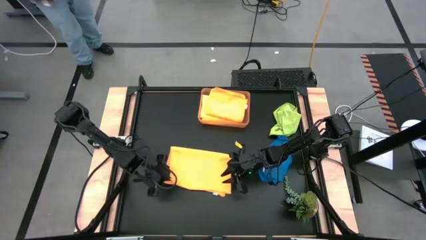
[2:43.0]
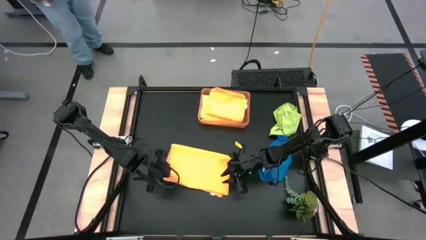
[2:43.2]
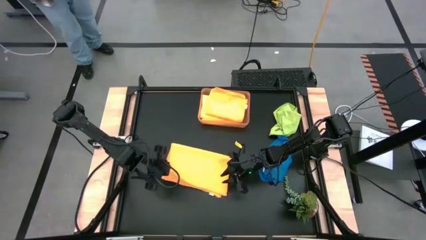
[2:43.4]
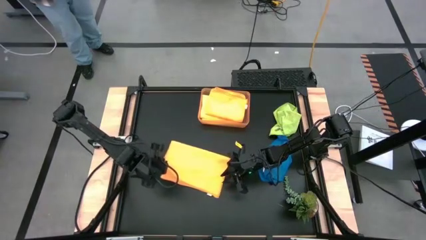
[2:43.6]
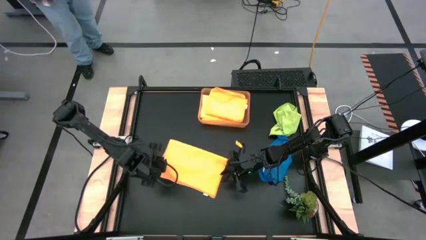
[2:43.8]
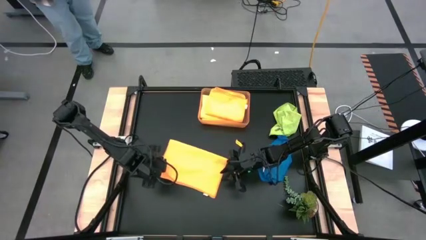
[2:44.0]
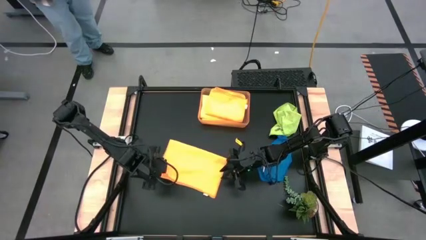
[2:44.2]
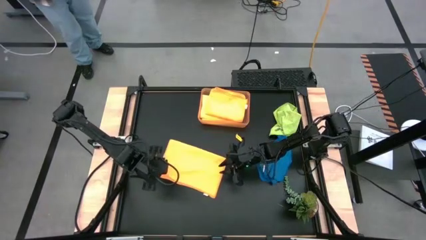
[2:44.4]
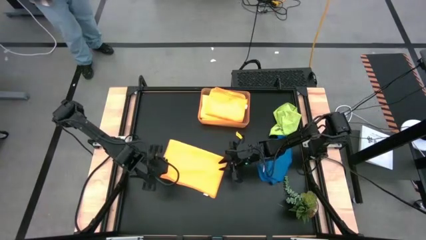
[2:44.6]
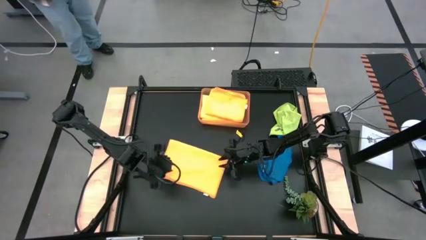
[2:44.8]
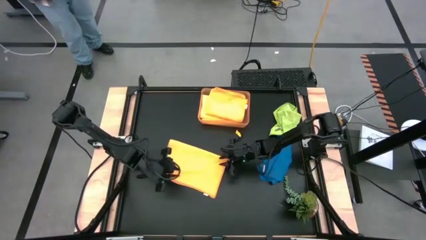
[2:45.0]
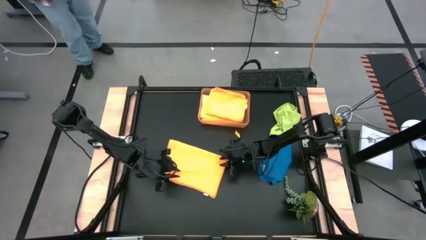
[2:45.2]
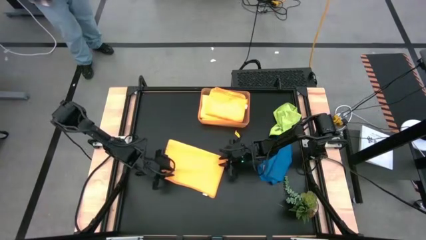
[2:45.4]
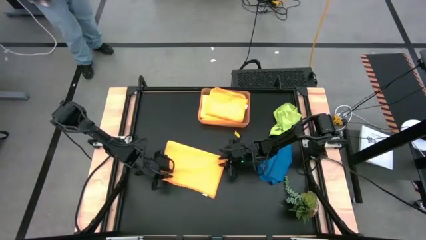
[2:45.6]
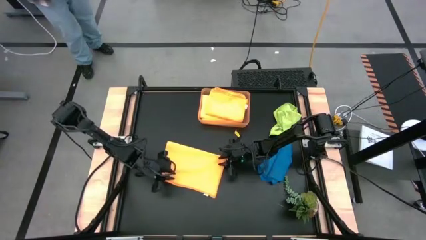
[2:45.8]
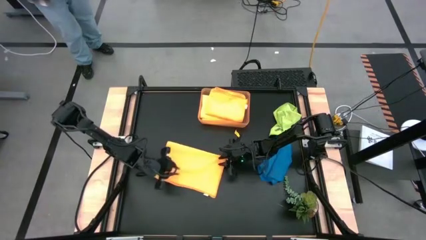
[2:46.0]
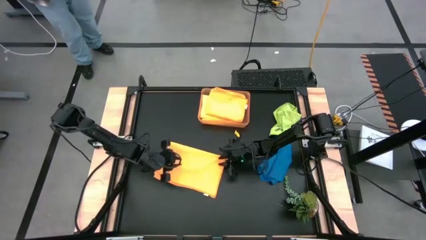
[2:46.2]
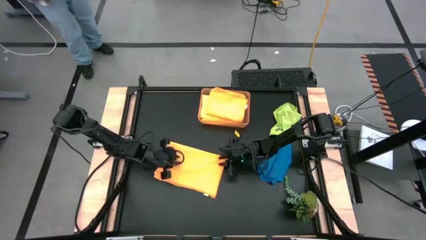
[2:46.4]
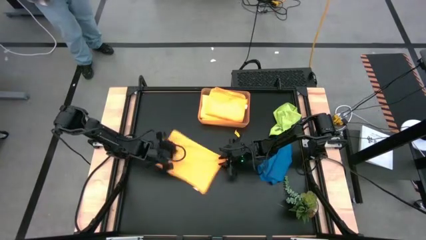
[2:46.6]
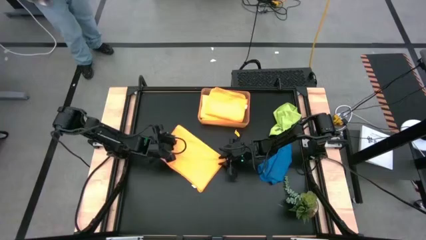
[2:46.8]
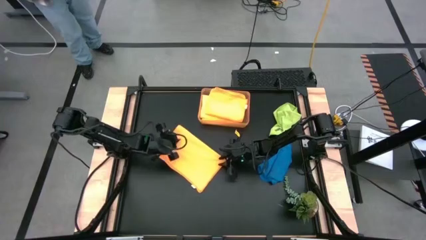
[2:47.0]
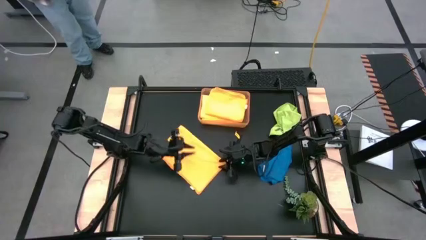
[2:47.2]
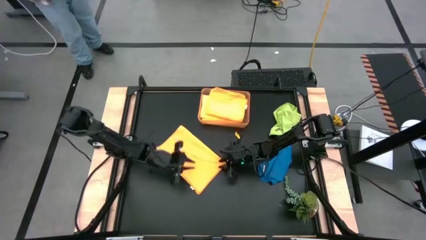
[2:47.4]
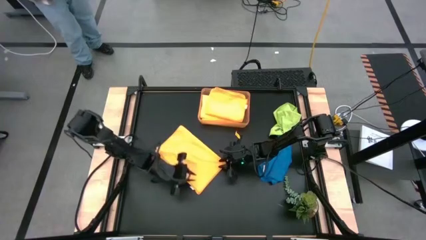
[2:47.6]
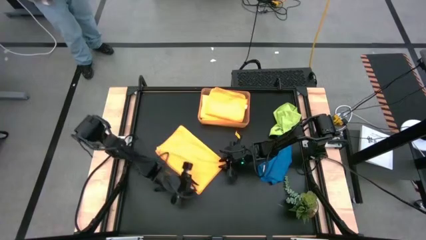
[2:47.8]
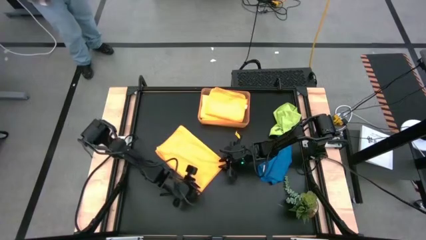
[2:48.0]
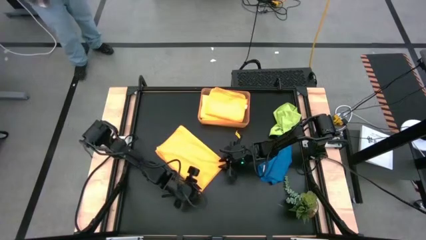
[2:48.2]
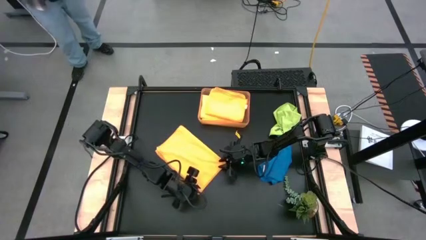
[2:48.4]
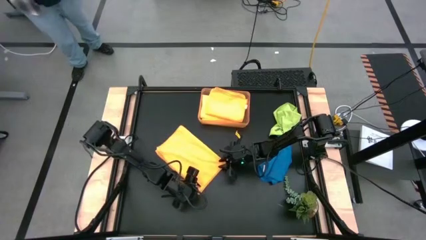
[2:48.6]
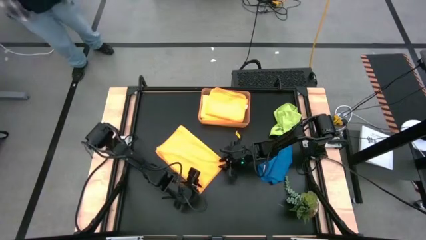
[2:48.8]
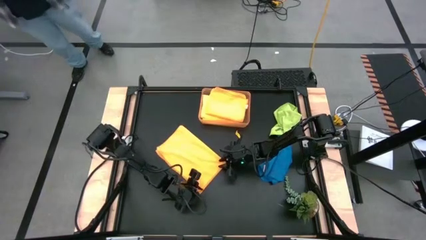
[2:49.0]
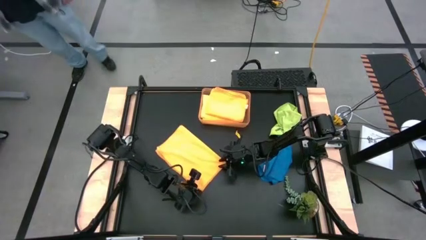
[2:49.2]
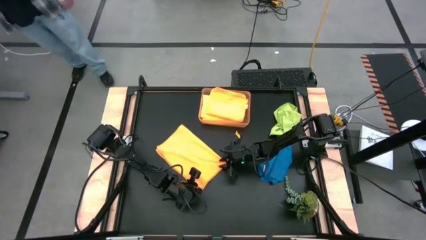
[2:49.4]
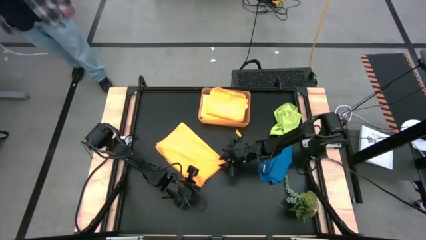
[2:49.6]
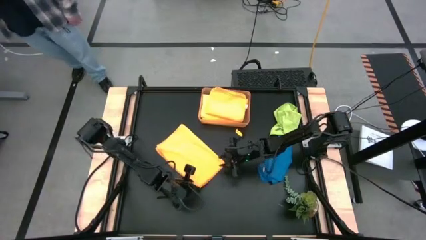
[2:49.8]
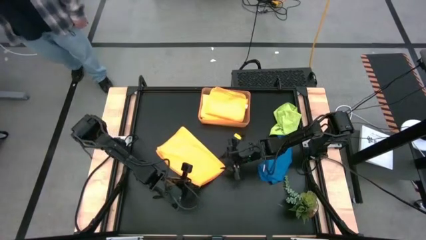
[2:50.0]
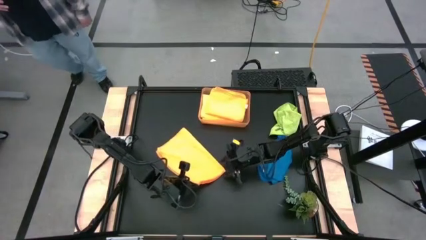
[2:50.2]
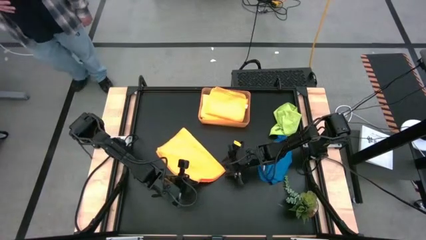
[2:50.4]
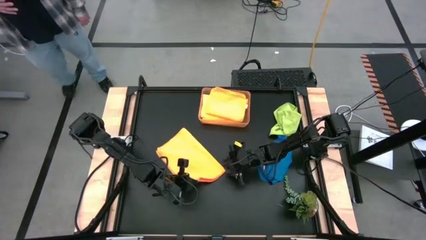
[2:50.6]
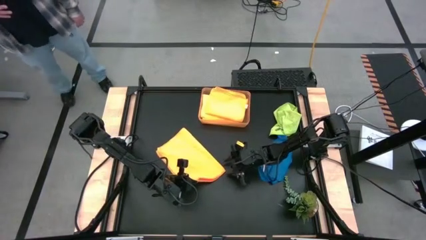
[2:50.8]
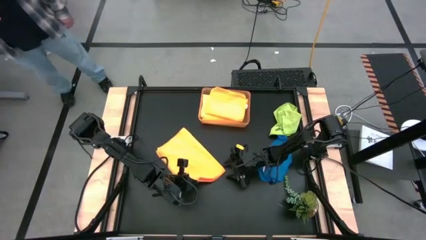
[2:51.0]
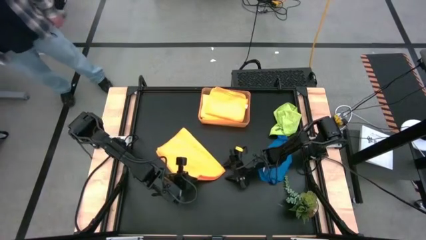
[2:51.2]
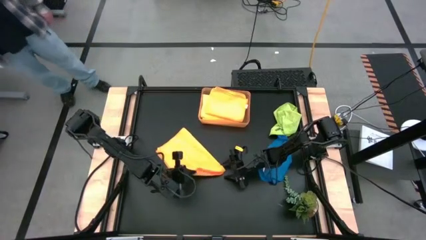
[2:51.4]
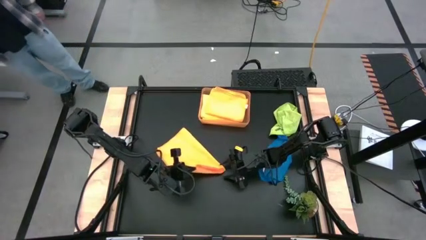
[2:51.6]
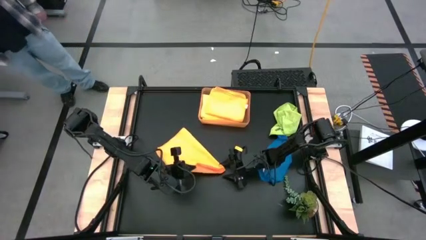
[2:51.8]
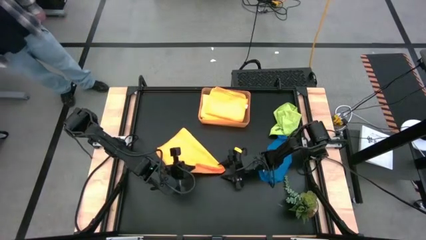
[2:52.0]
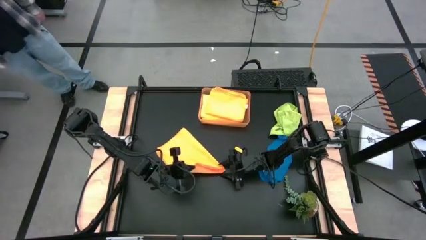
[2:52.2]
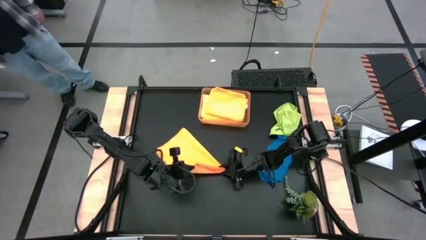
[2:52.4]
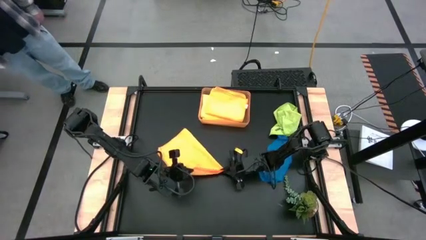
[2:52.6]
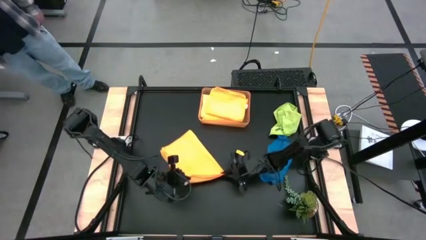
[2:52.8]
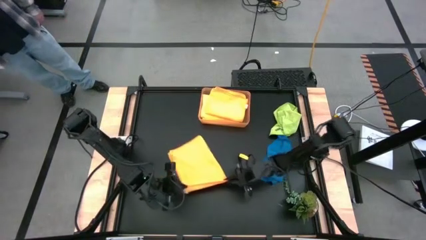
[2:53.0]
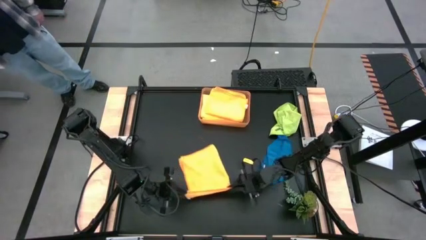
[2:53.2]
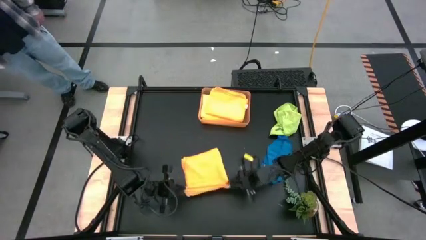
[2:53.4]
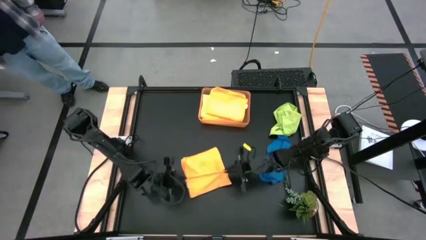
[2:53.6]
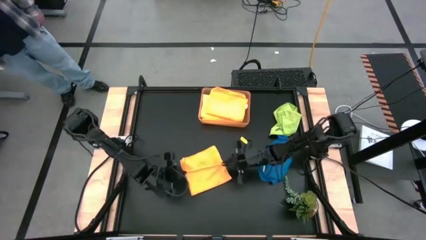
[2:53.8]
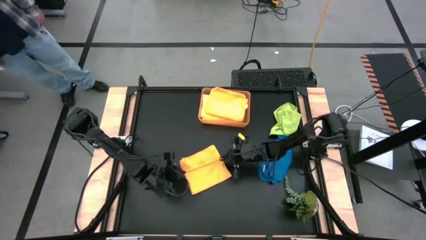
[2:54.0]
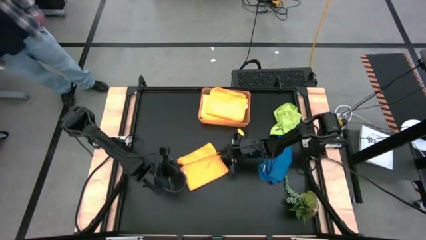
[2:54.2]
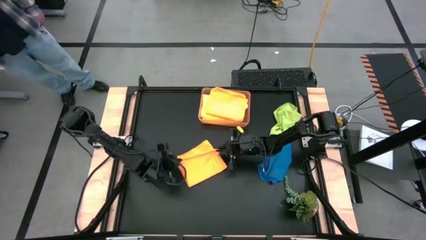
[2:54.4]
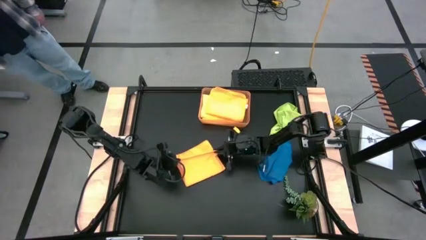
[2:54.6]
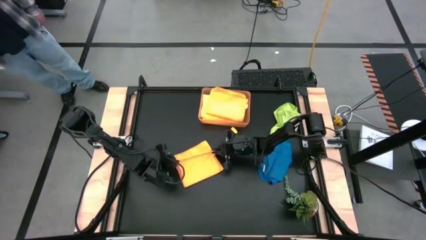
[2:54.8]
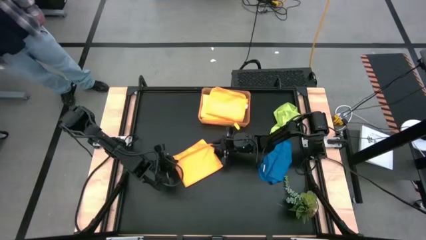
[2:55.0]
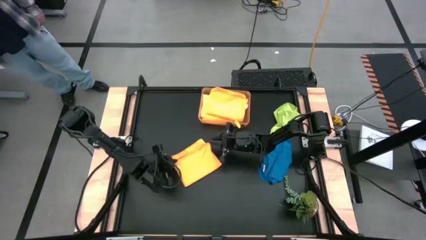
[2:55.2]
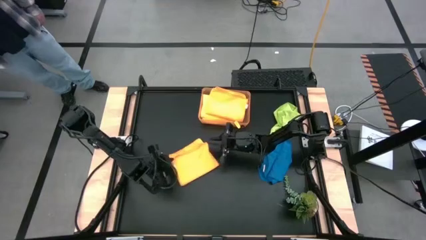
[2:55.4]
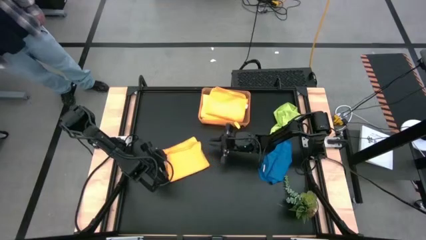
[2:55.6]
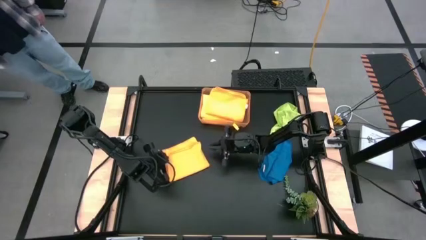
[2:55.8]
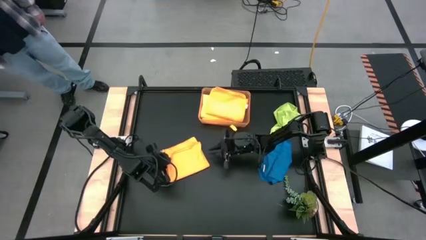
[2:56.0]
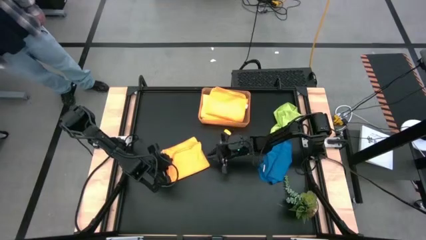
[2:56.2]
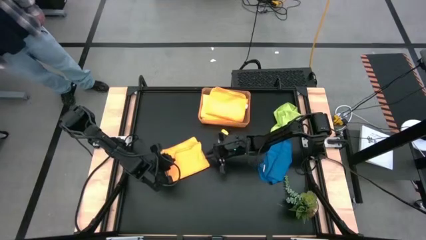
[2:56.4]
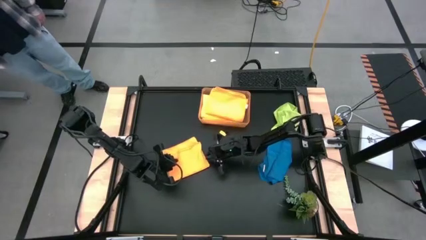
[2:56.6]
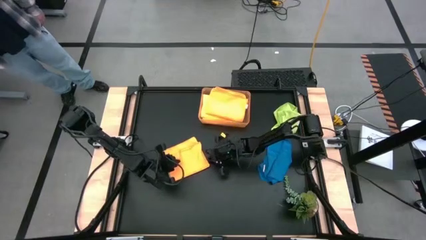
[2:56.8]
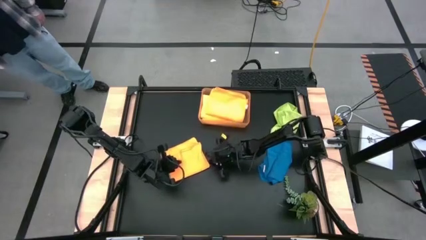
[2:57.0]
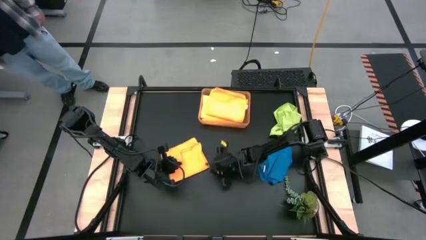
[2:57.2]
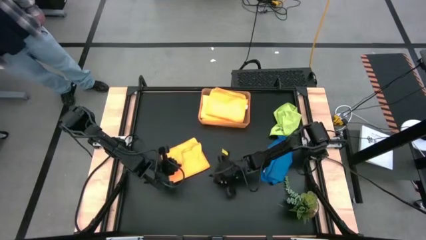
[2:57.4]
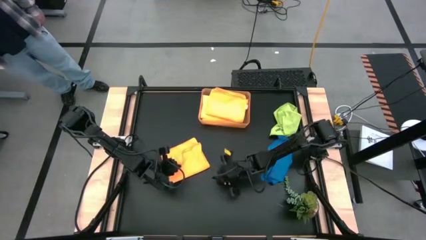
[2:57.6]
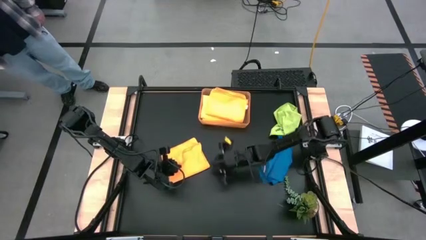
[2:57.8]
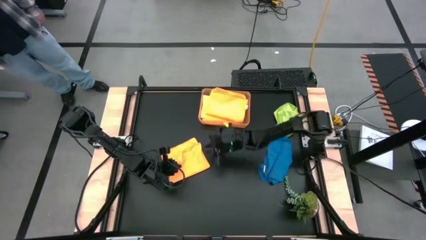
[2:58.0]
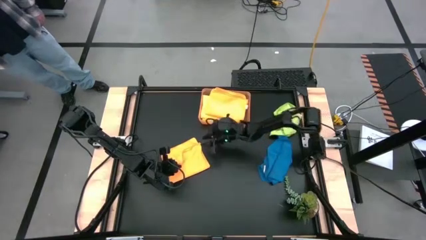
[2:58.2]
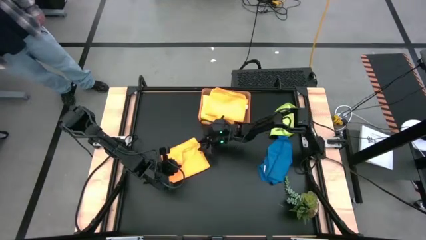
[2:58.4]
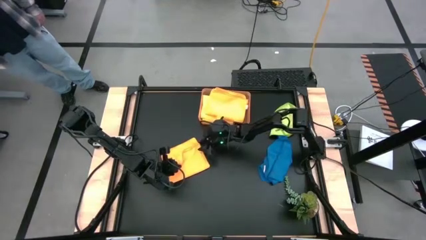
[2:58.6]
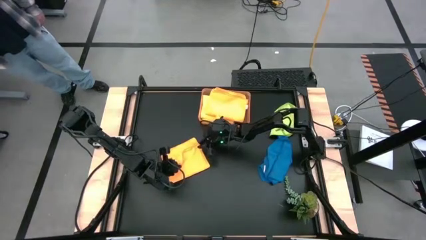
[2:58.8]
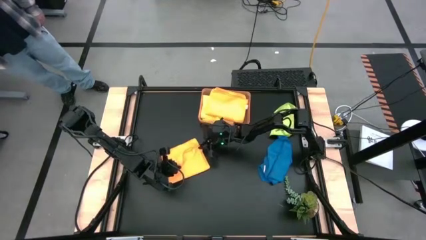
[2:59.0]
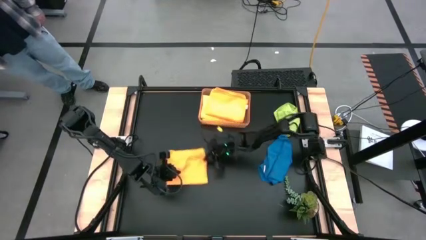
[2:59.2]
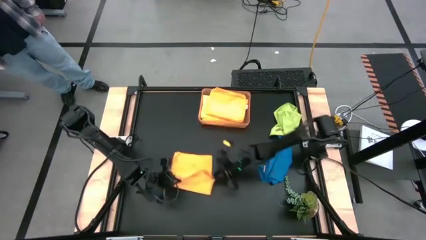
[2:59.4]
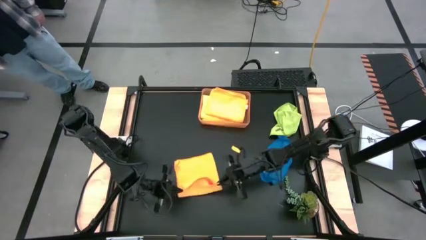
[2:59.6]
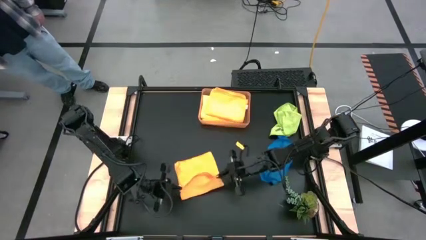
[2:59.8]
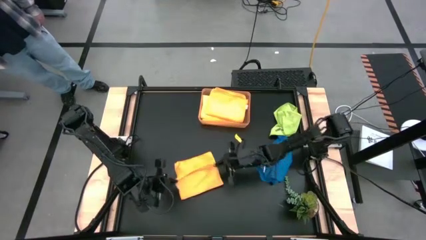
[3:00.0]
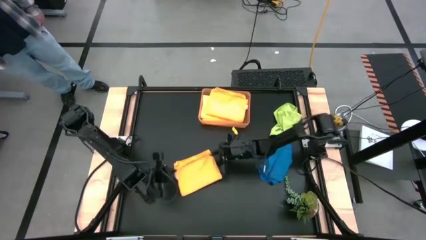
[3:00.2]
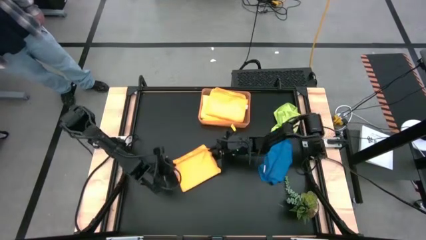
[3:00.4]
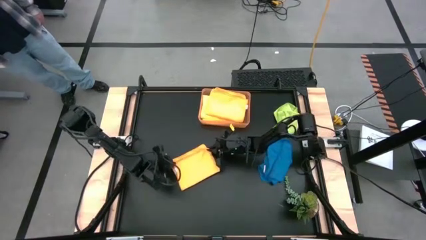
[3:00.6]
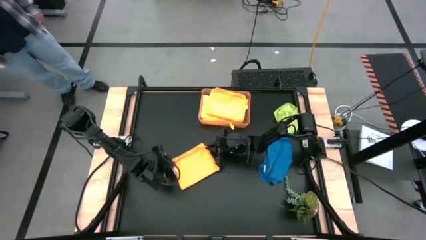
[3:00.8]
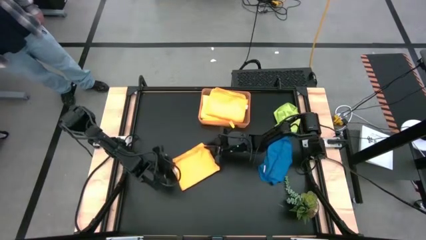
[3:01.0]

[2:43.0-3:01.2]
Task: Fold microfiber towels
Fold the orange towel
